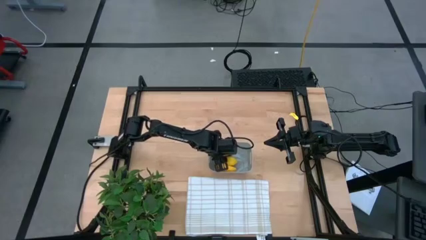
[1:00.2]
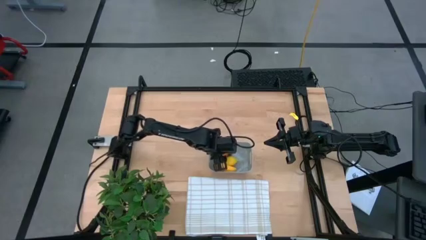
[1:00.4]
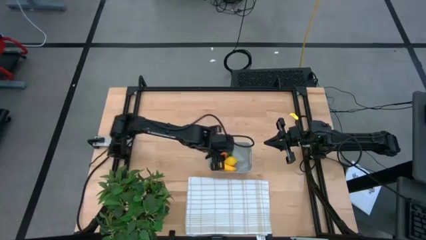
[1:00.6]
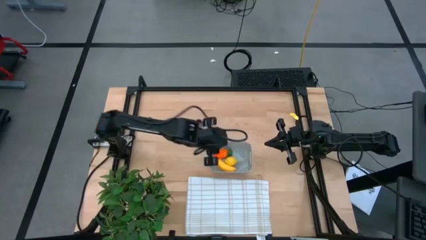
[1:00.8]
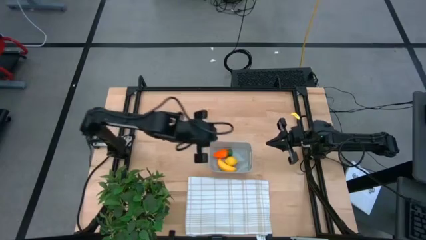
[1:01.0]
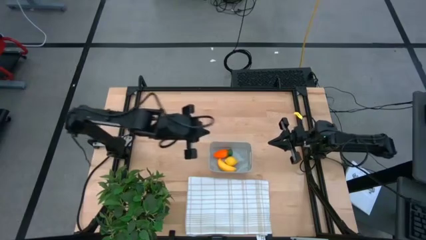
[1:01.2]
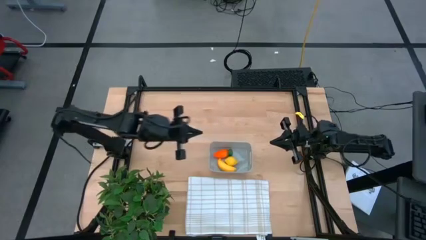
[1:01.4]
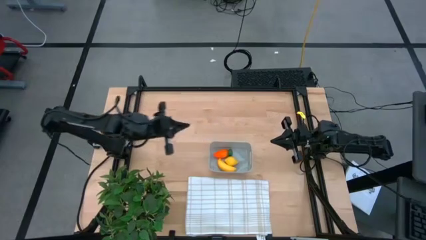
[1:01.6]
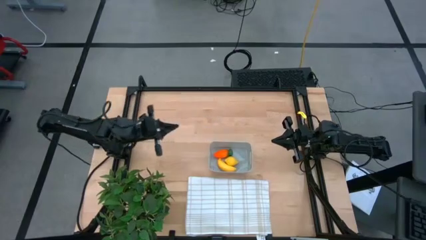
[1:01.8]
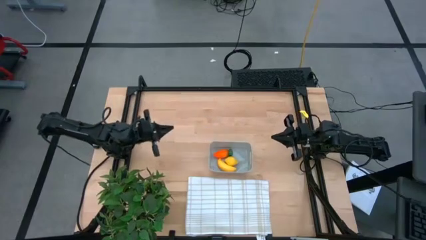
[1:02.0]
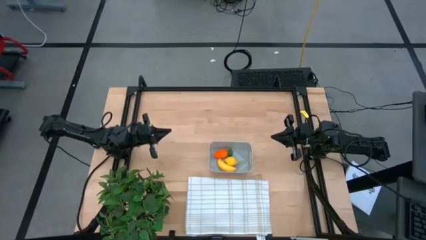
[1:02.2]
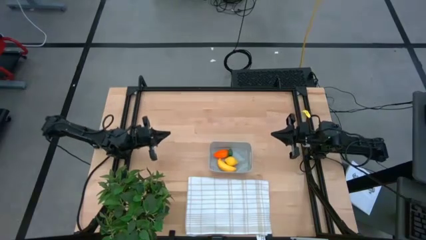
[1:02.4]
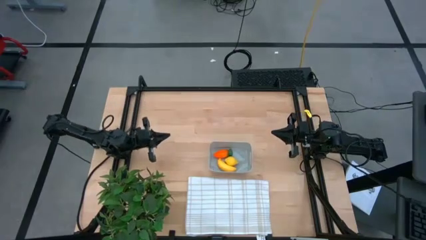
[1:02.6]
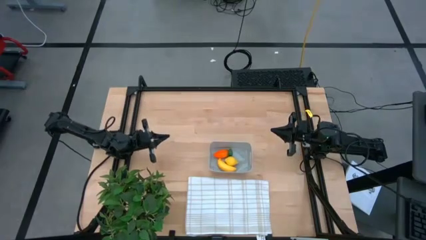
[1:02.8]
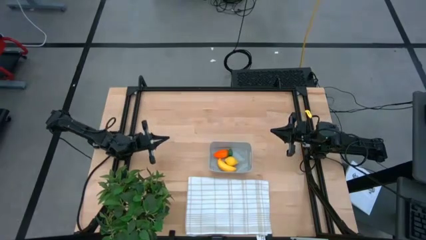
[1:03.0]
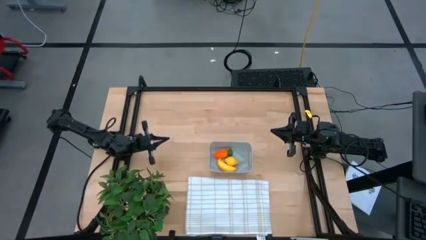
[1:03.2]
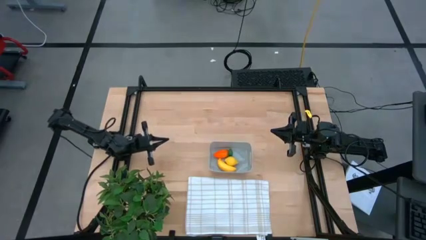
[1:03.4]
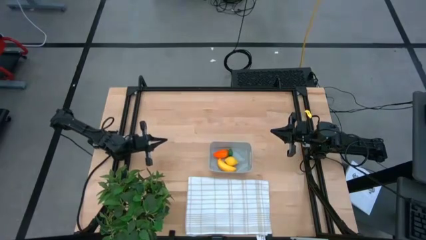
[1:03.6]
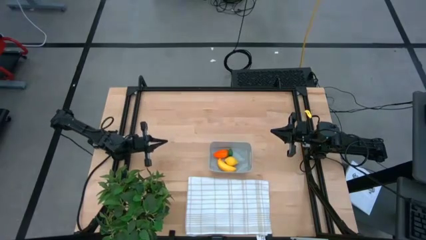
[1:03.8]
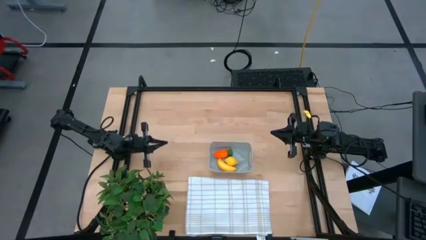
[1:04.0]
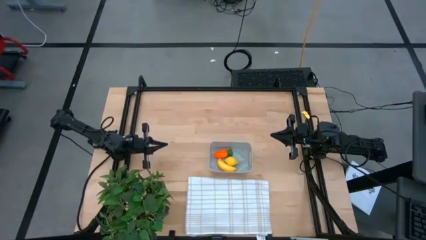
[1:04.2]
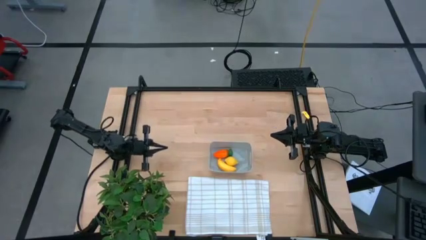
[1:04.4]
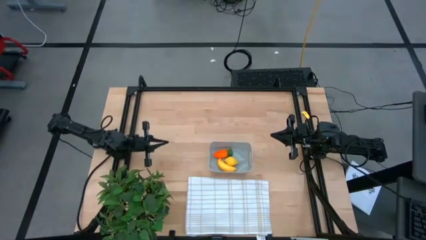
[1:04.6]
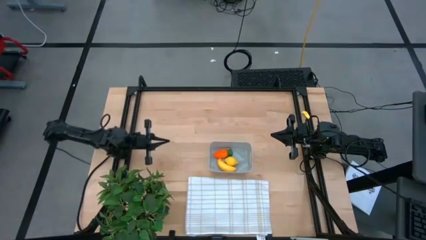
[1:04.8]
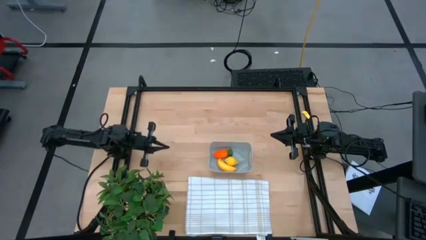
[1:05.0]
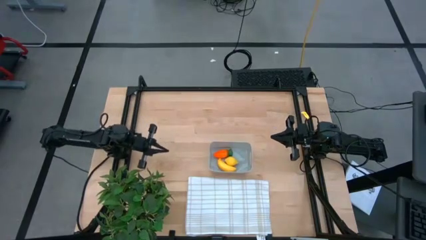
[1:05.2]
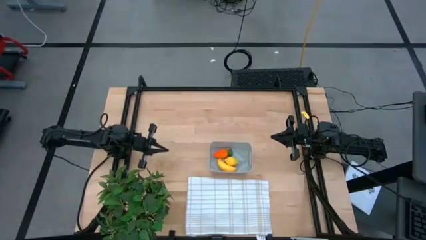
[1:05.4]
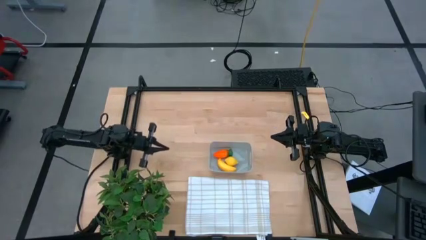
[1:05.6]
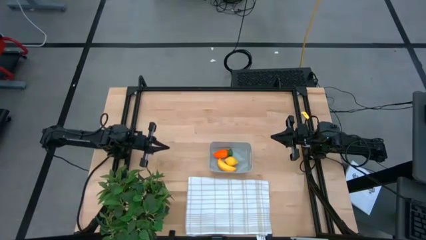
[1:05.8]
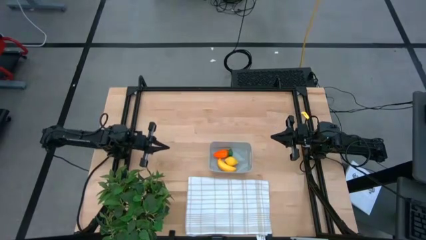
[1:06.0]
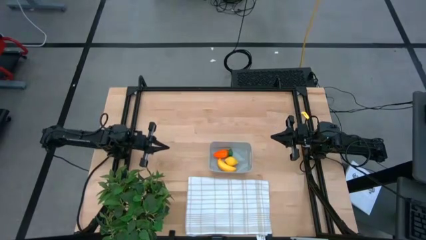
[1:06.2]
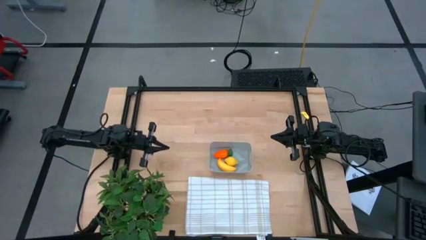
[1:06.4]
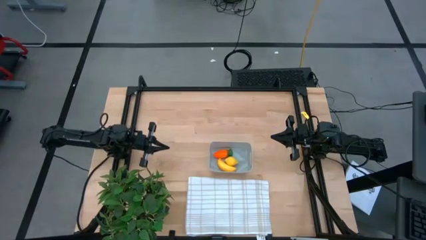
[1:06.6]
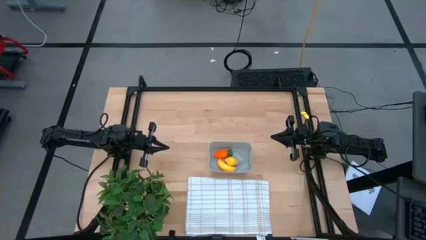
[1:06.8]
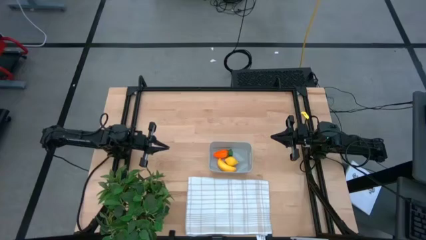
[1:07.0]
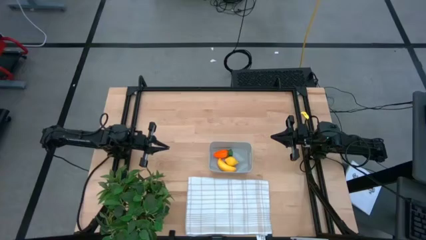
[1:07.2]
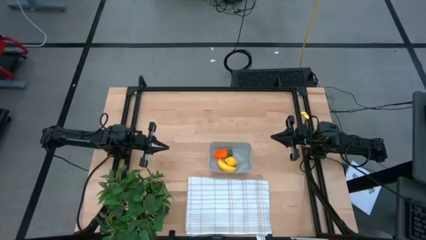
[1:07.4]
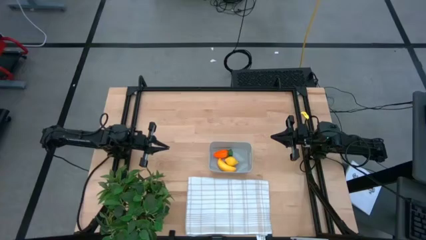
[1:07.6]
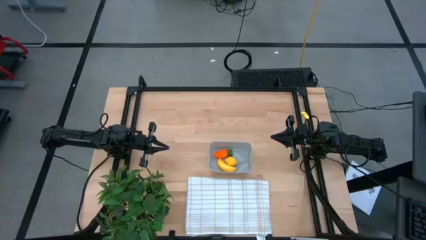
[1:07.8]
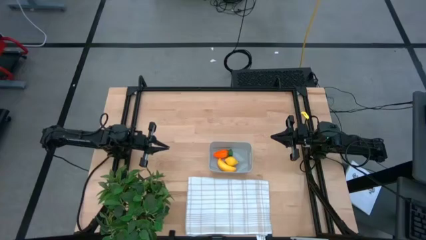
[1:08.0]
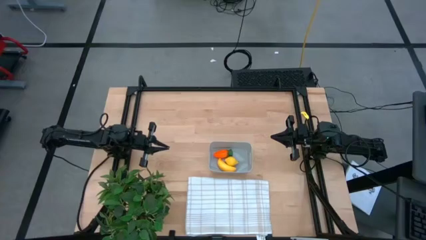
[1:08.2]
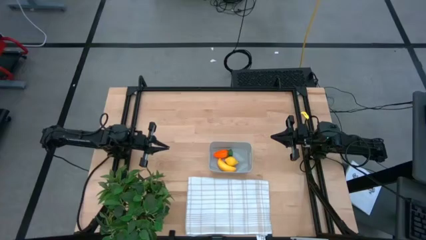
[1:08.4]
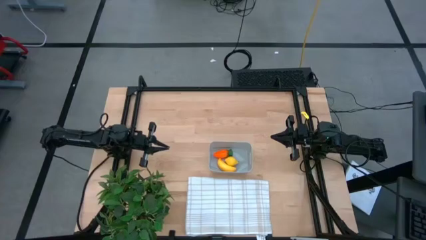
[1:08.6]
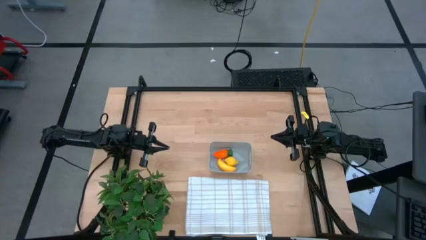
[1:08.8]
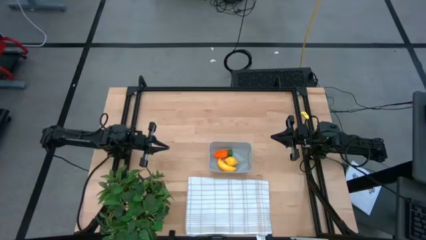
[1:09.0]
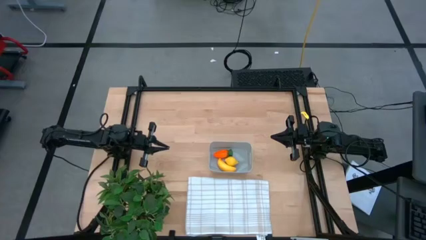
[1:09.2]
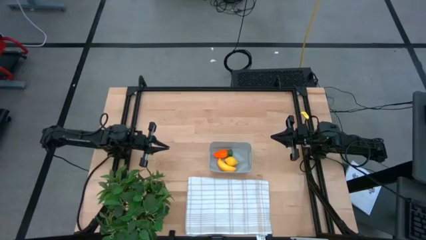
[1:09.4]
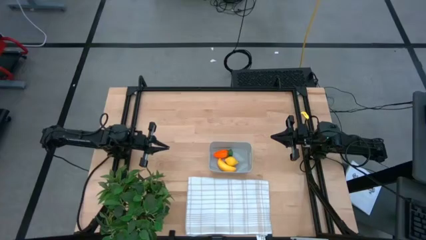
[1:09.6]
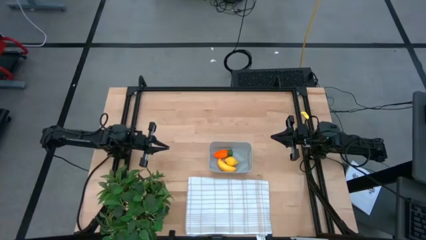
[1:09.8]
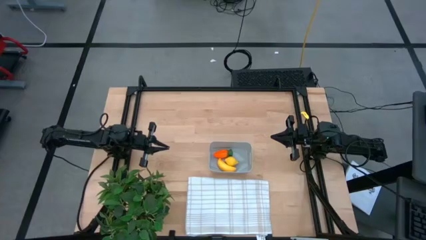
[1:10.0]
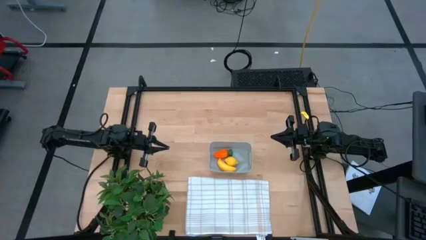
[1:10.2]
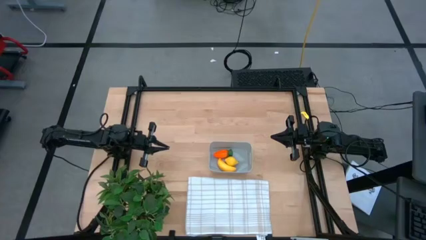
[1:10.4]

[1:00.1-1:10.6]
Task: Pick and placing Produce into tupperware
Return to Home Position

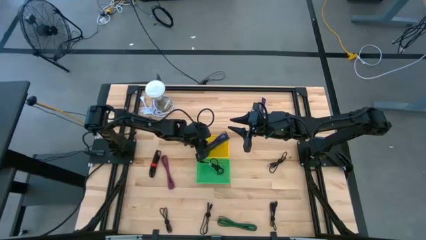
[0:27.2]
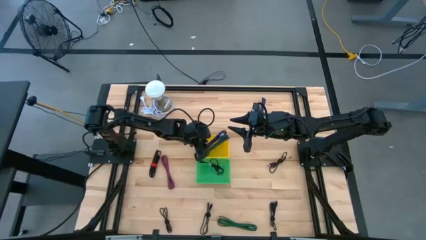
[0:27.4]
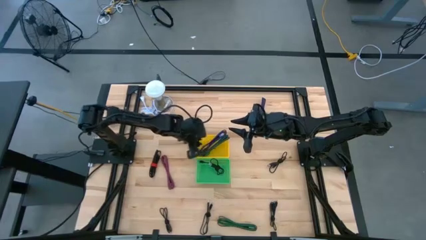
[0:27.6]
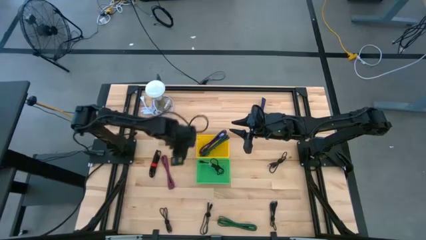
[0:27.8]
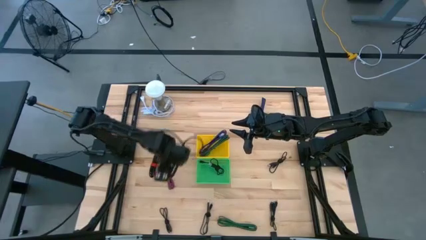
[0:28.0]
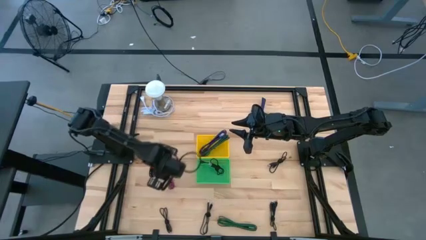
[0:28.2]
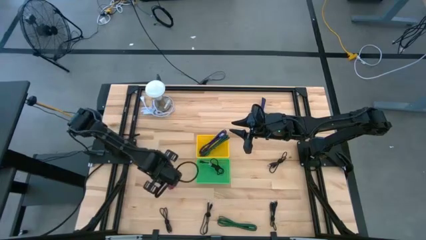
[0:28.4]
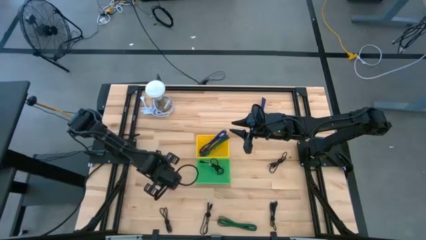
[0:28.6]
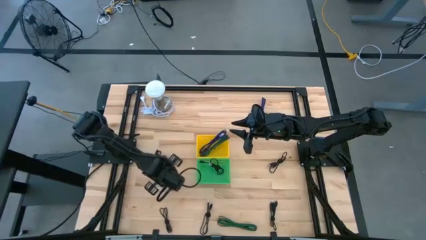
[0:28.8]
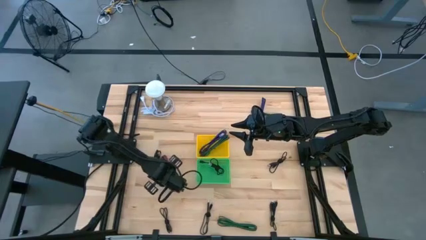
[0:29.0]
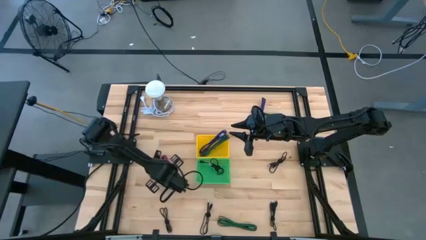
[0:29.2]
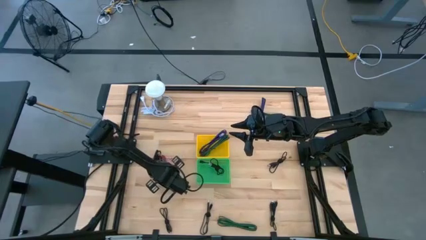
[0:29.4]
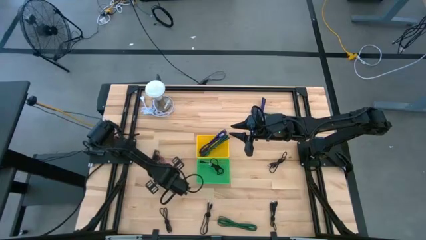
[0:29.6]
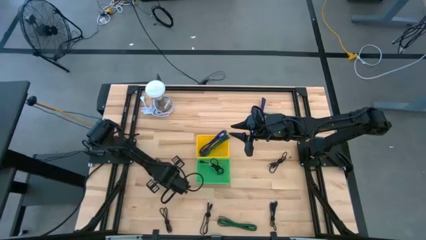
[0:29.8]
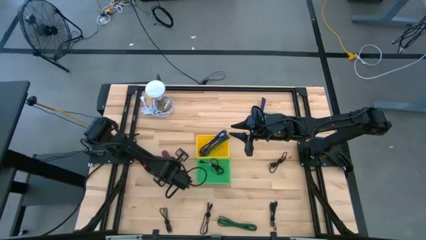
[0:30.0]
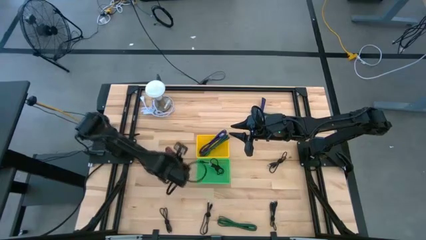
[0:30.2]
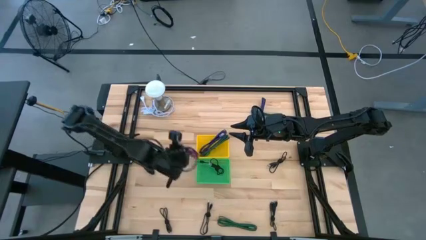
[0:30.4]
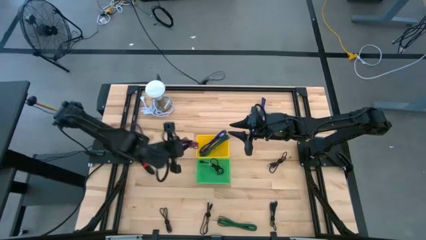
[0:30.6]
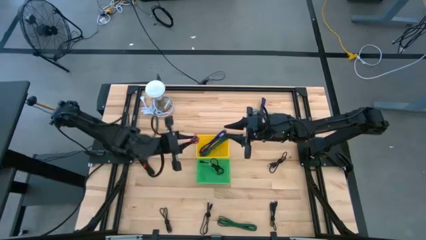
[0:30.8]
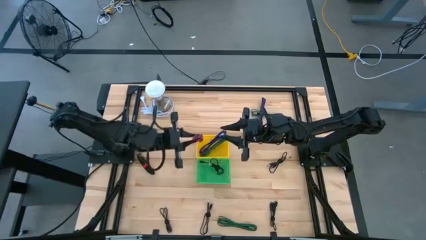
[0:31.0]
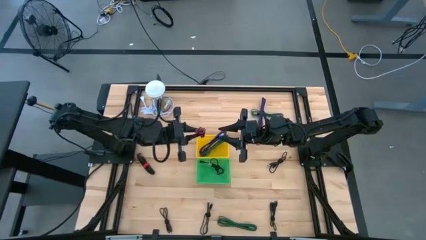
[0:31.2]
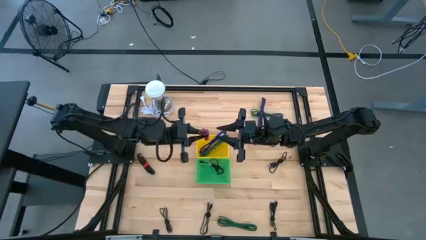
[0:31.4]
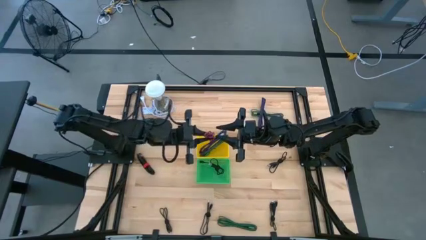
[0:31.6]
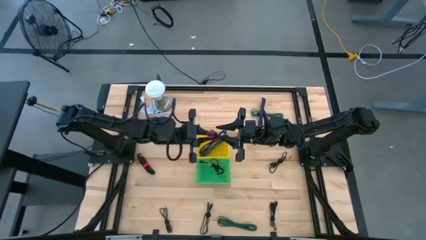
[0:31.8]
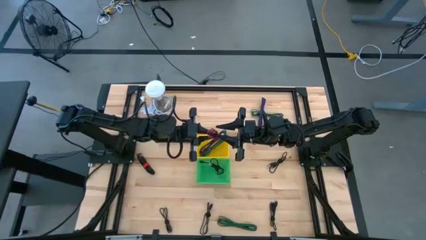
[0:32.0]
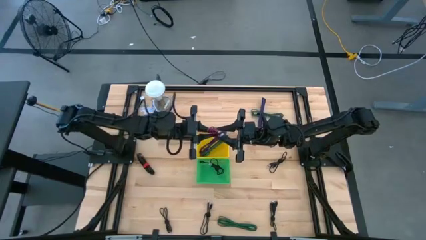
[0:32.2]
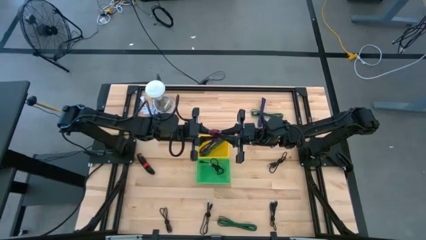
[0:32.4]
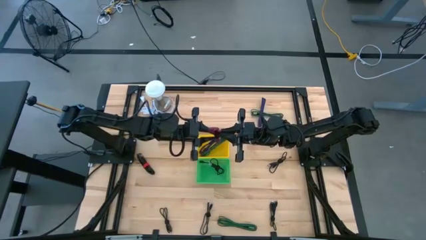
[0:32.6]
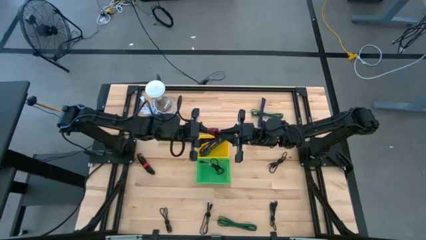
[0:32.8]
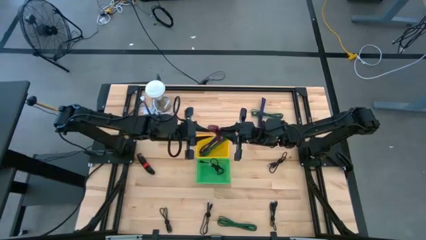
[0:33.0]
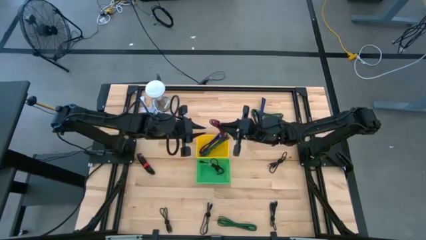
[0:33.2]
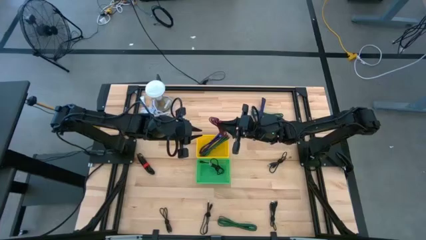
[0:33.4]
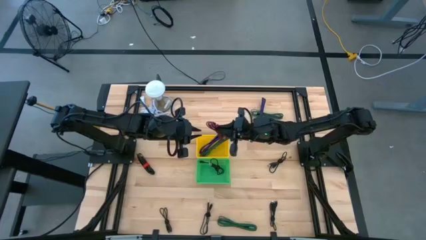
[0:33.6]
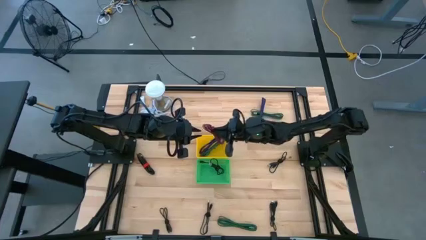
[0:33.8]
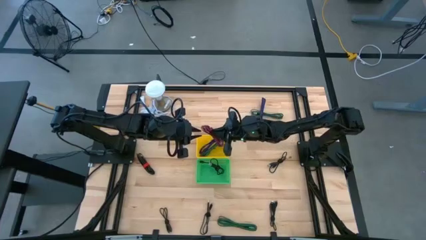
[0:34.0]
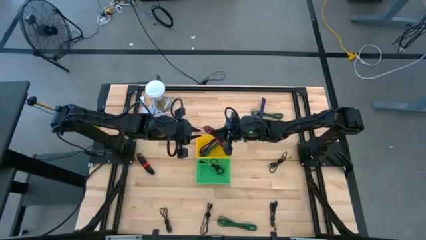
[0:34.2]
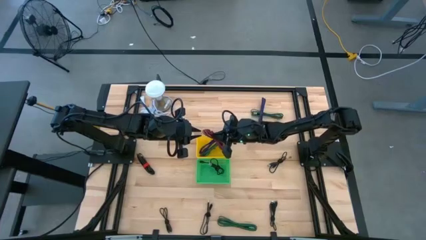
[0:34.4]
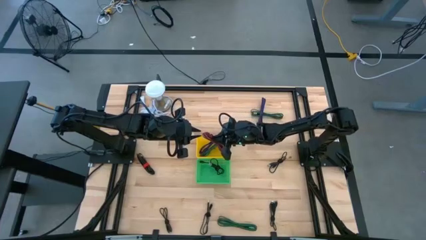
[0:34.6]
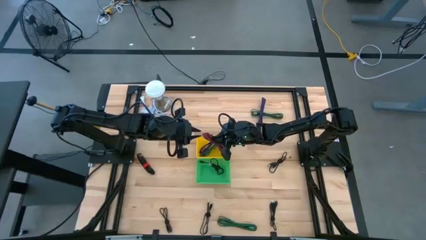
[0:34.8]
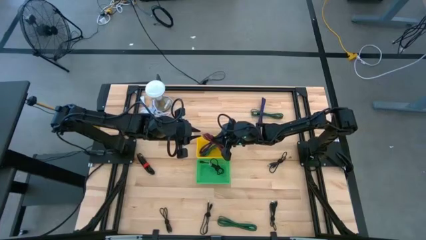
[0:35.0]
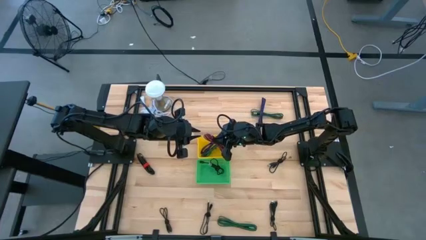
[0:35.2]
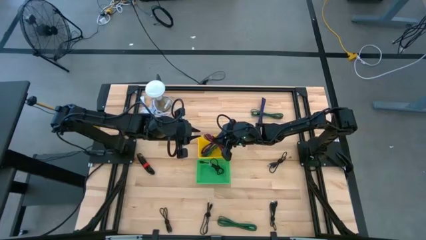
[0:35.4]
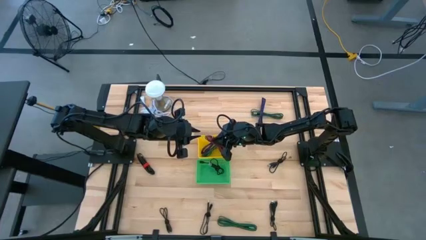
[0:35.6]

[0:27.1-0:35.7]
Task: Pick & Place USB Port
Put the pink and black USB cable into the yellow bin
